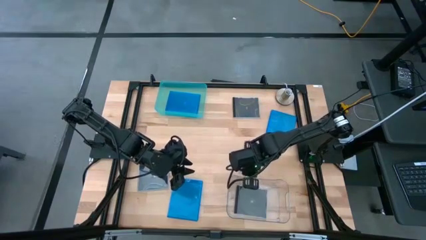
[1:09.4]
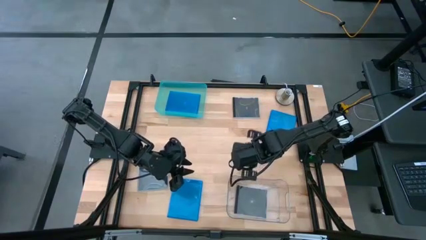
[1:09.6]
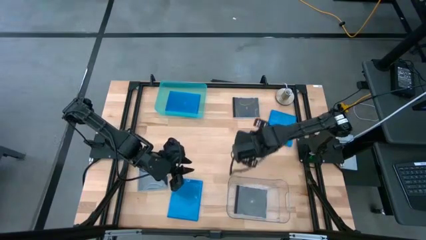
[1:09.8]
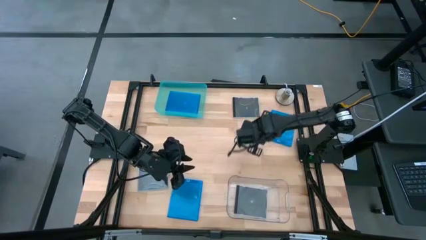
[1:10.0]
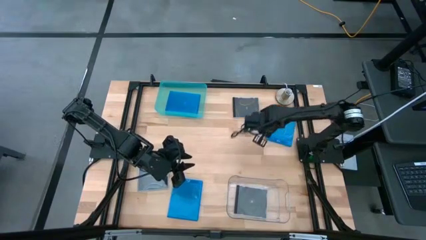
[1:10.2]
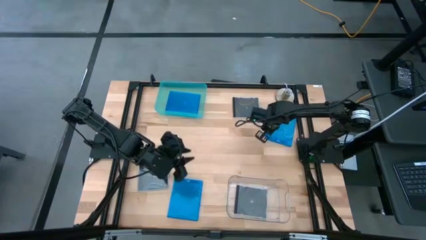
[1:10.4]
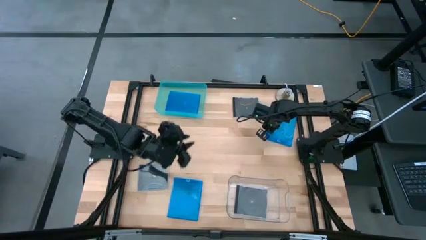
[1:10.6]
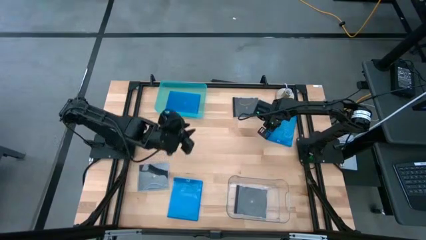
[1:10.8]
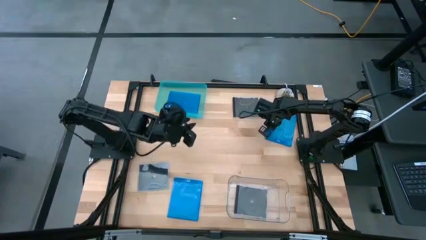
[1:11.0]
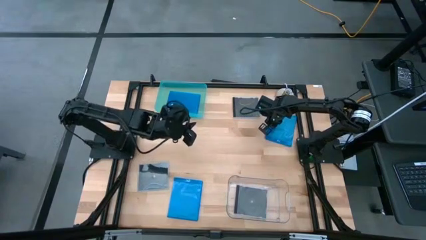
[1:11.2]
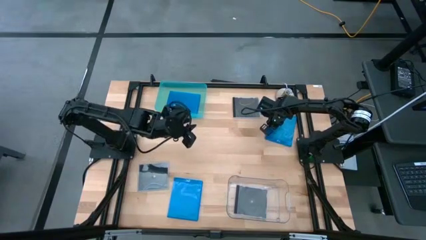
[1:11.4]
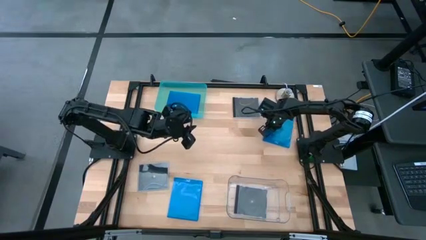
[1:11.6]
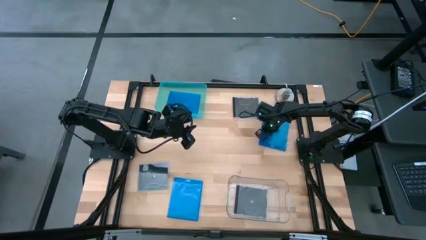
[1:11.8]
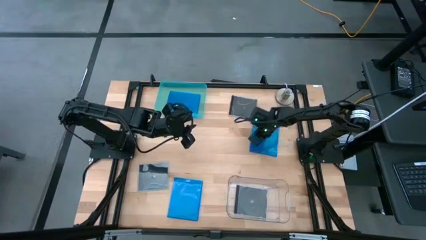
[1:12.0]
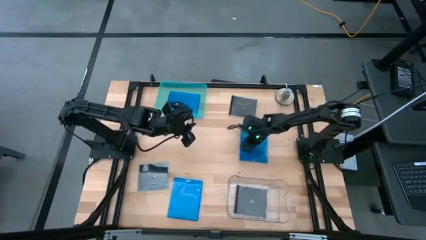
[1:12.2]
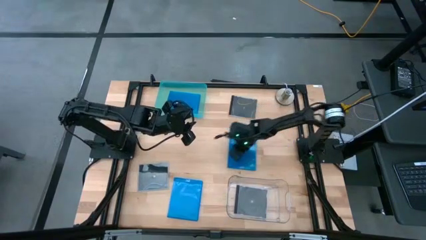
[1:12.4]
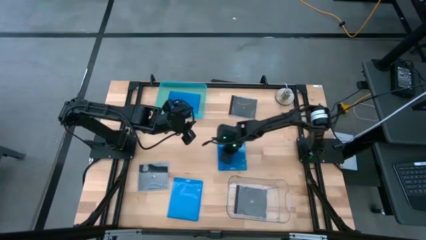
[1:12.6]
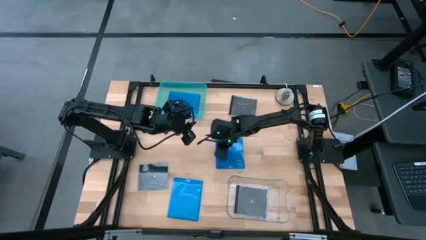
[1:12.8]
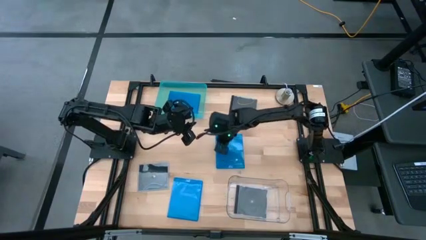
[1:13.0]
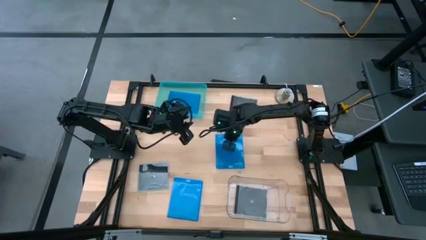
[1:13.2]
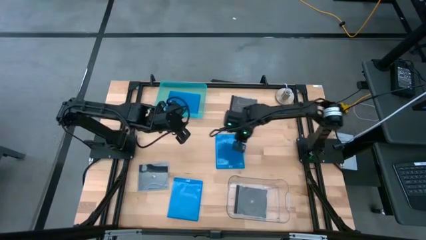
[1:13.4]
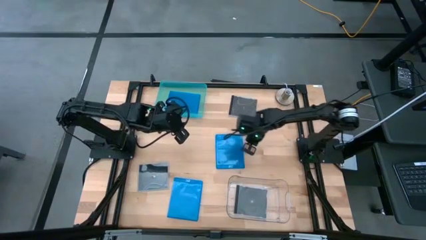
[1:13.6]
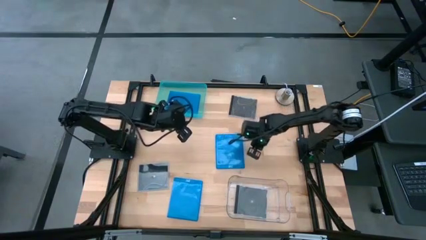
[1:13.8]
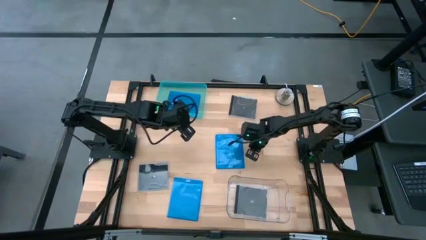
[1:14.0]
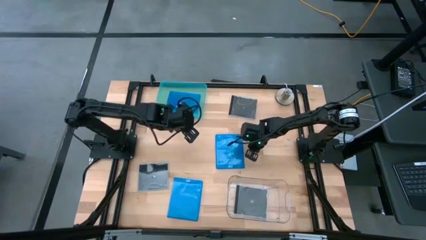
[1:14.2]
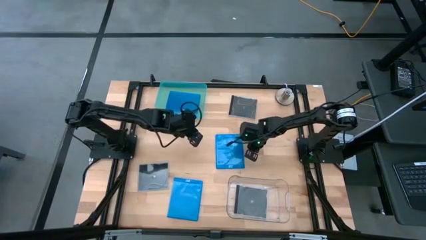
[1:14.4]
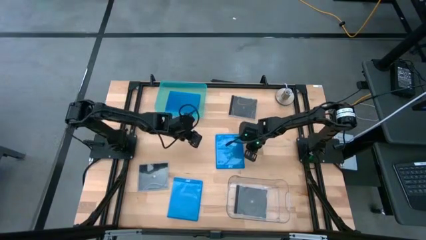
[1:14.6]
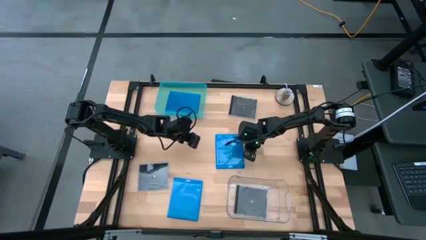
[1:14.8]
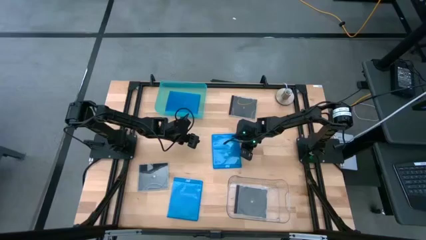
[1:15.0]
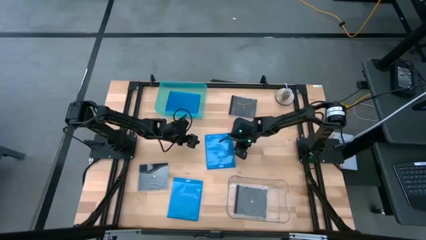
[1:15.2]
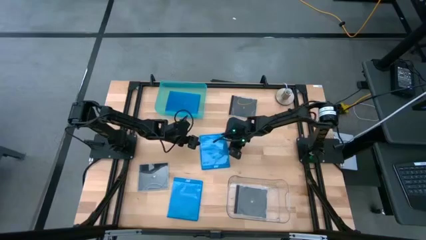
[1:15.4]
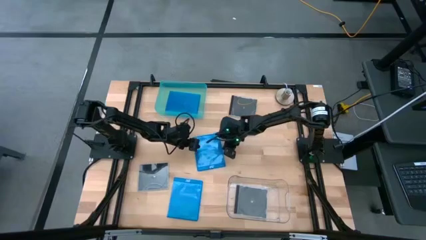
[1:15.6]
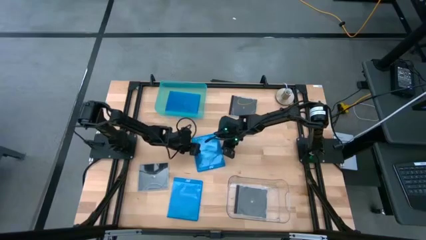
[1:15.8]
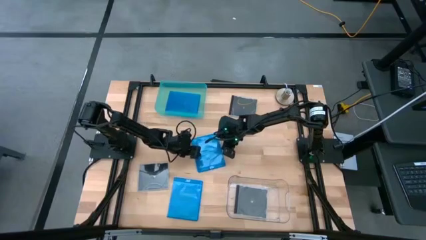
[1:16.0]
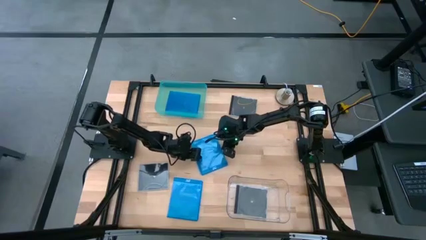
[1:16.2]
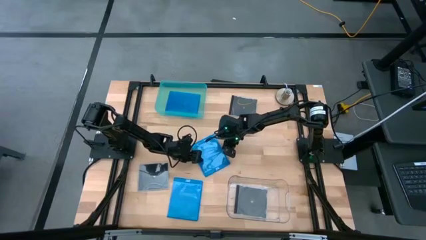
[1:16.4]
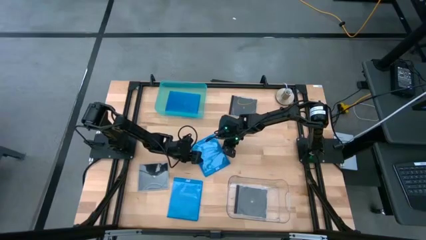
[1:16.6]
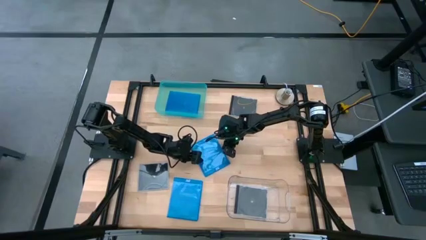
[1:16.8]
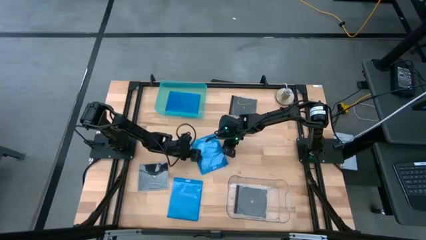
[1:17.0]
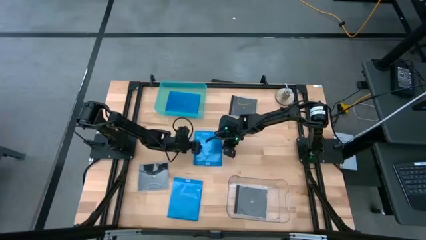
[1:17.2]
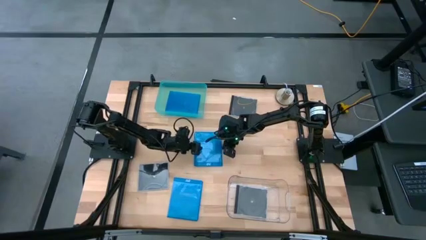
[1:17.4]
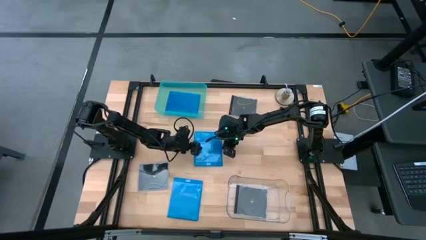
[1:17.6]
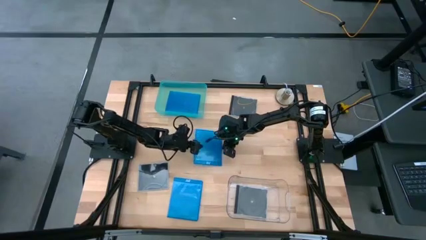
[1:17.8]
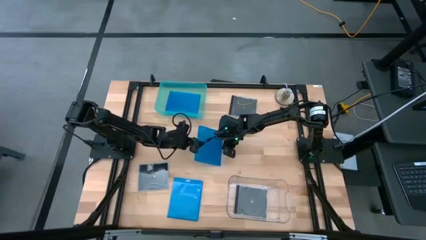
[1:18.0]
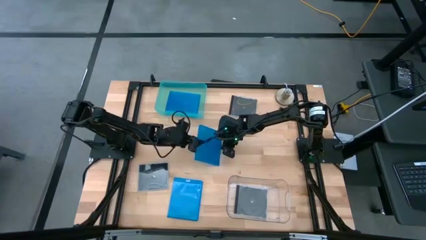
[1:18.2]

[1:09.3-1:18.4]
Task: Pick & place jewel cases by type
Put the top dark blue CD case into the light blue bin

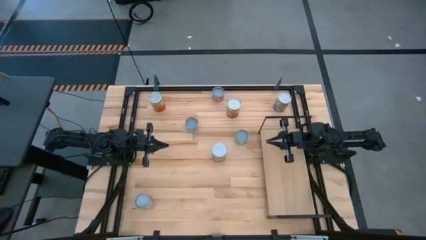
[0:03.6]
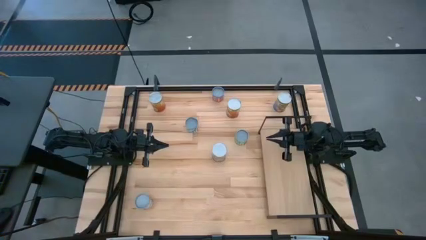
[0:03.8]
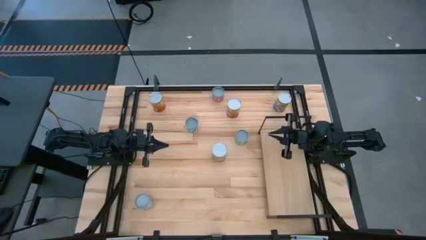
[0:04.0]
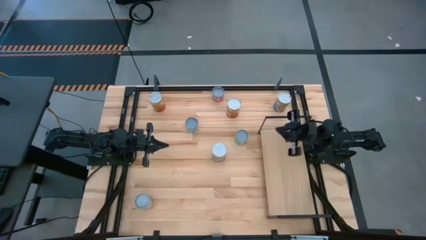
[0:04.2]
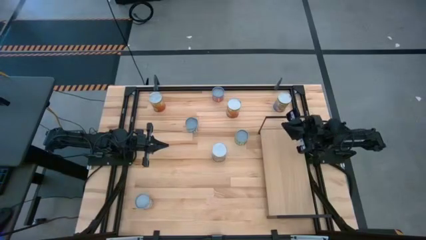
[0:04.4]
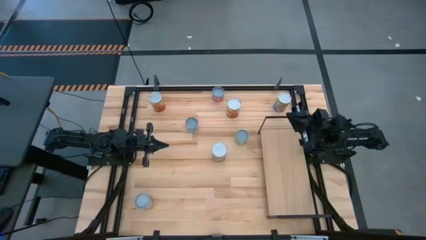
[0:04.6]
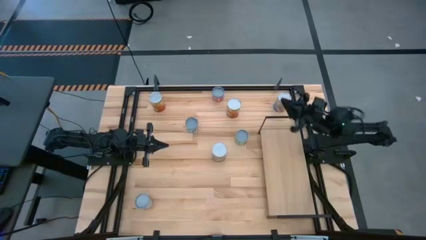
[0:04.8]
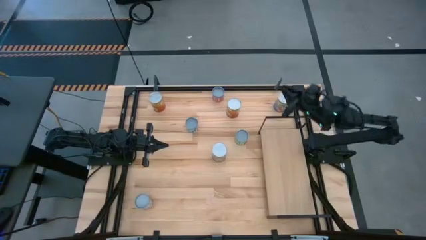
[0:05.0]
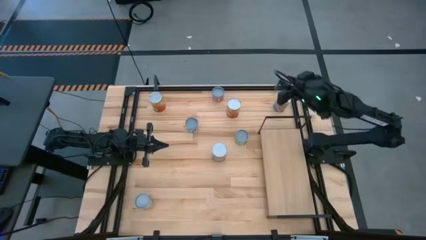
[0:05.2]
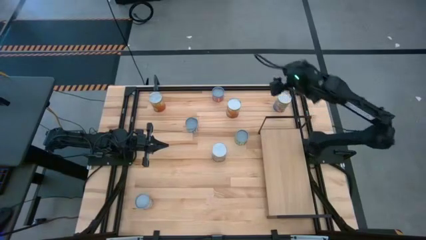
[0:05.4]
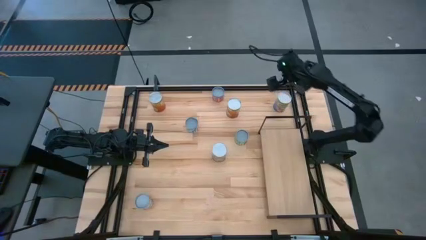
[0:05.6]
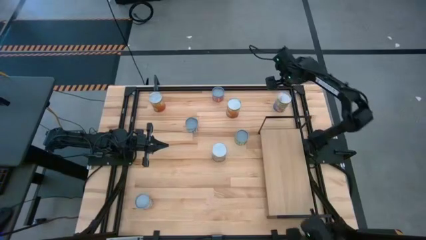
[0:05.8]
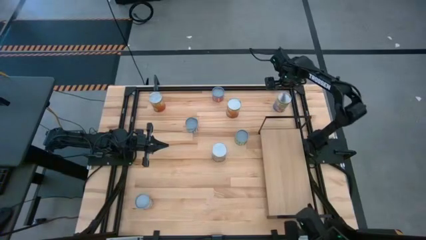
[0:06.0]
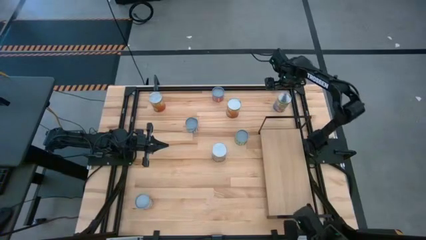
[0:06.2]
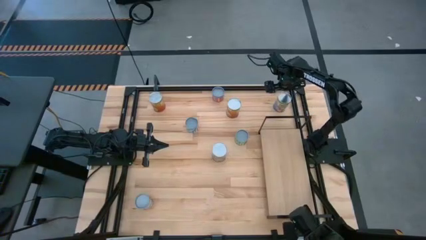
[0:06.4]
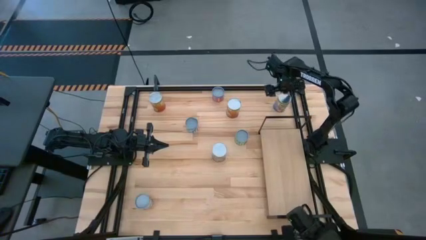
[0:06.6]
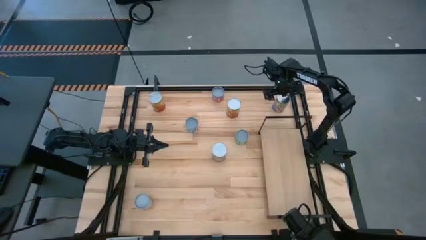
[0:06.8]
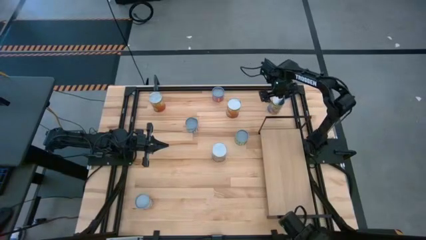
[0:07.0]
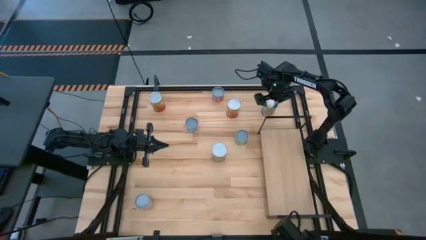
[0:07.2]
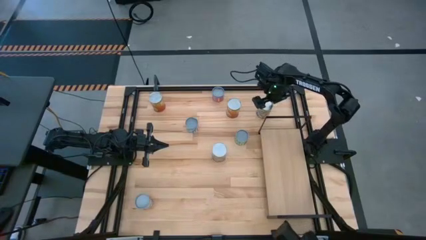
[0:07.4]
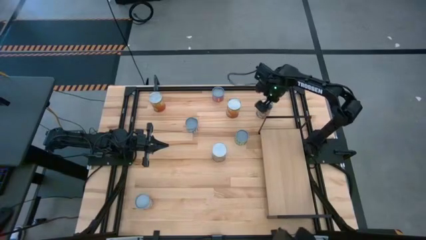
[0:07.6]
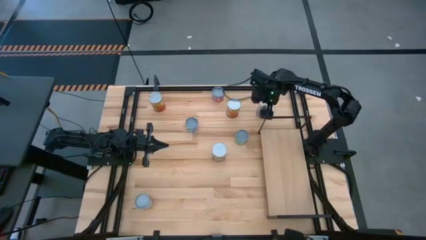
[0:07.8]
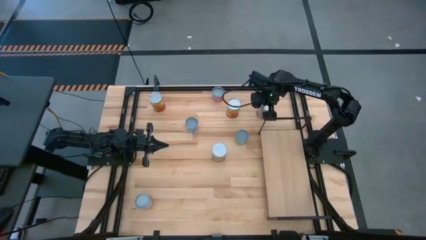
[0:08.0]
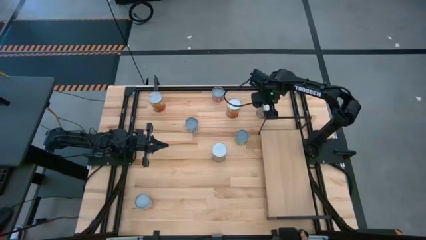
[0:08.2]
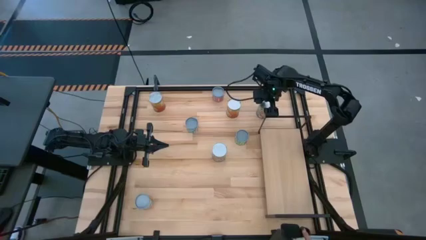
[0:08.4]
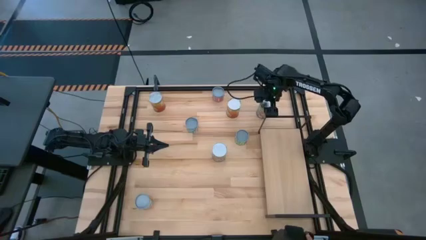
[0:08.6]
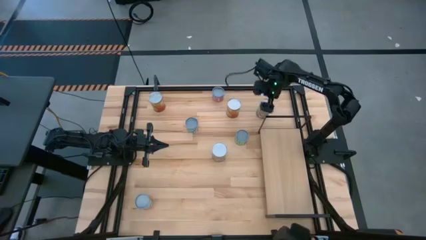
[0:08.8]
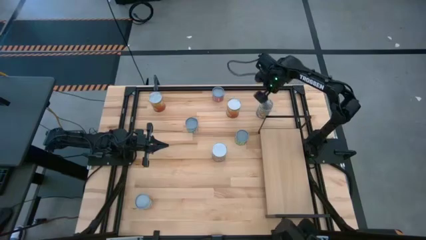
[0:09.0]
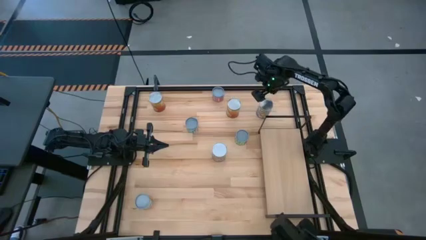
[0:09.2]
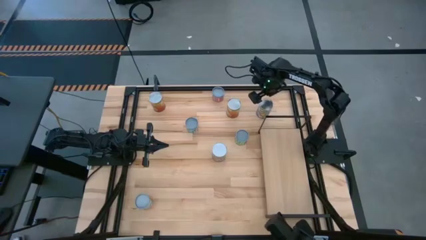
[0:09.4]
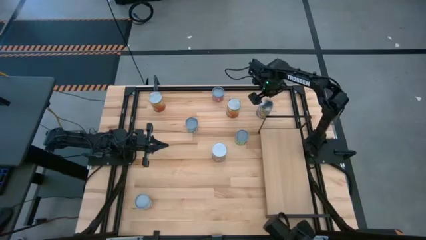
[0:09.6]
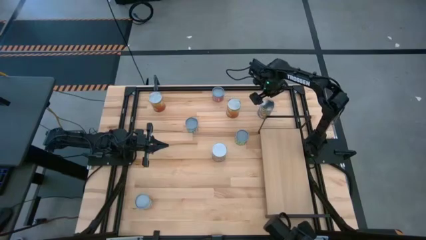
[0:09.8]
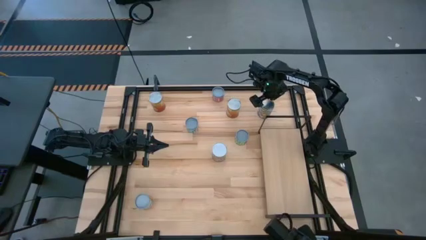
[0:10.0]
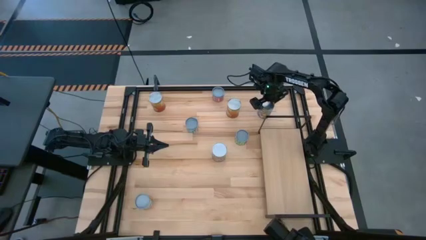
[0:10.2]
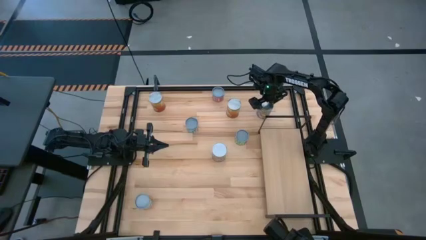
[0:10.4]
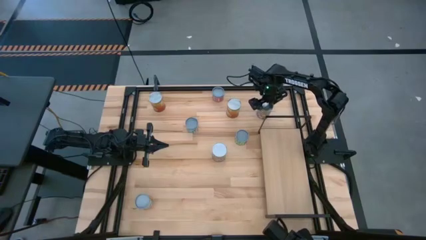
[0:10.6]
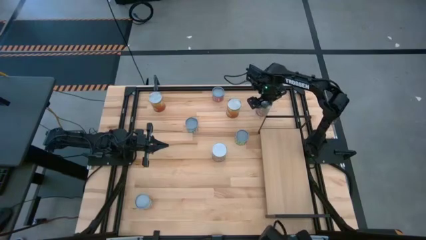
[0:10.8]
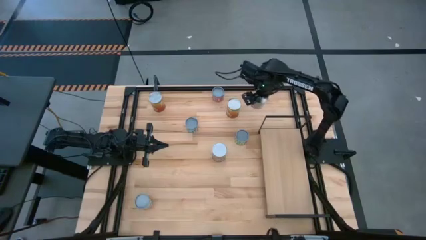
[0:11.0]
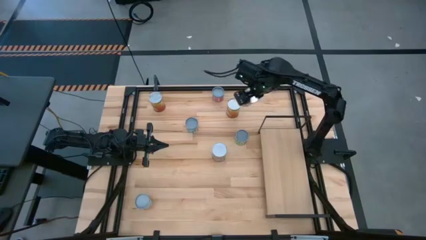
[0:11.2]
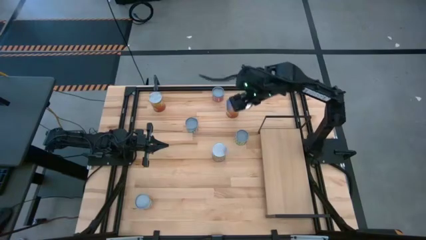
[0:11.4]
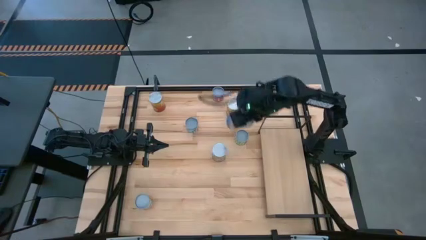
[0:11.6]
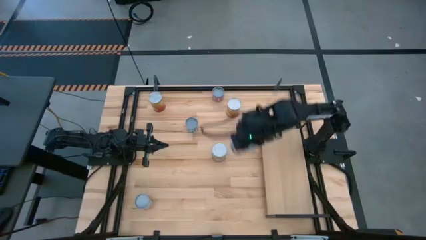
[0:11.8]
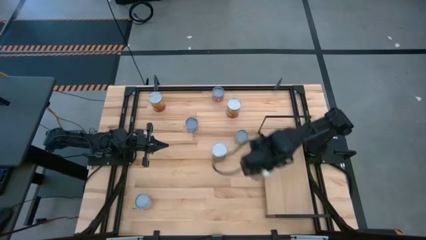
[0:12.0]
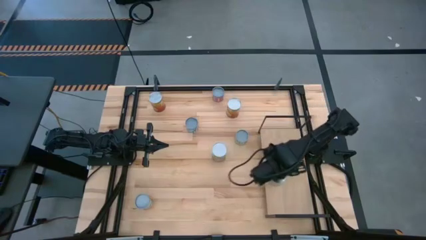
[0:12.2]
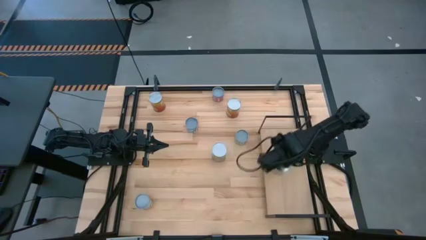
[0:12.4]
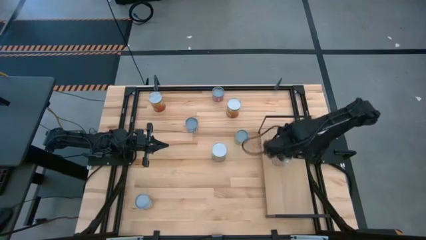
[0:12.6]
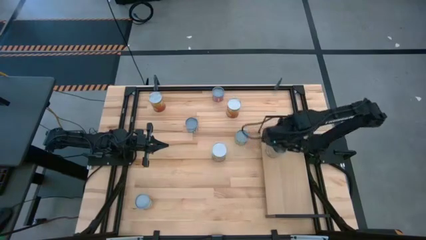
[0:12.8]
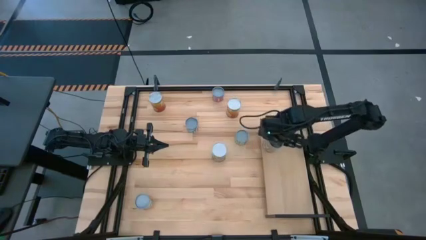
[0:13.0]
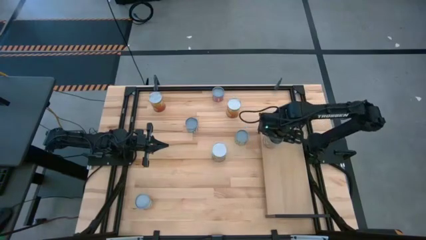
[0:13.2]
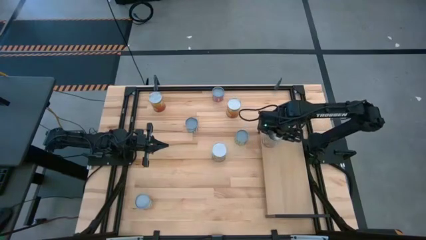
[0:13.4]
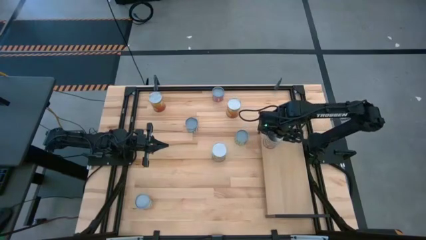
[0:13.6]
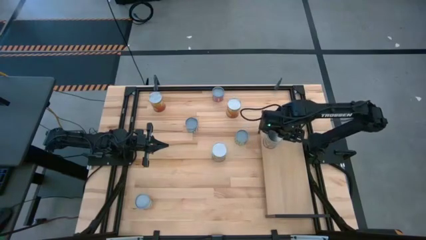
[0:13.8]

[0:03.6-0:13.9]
Task: Pick and place cans onto a shelf
Put the top canned peaches on the shelf
